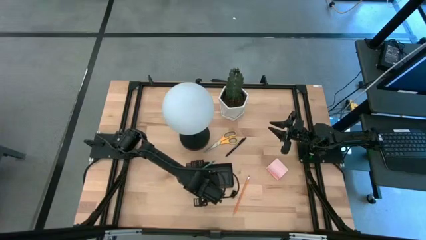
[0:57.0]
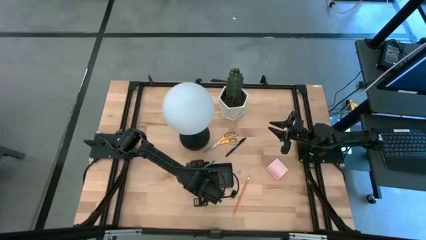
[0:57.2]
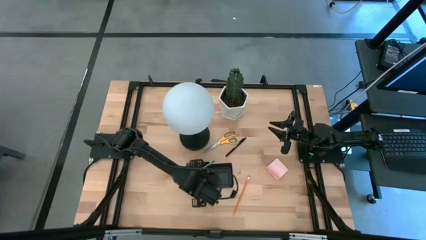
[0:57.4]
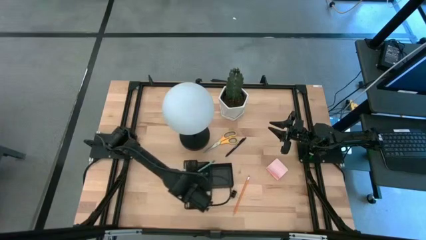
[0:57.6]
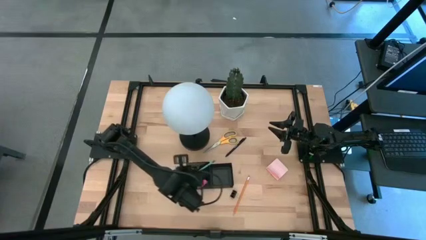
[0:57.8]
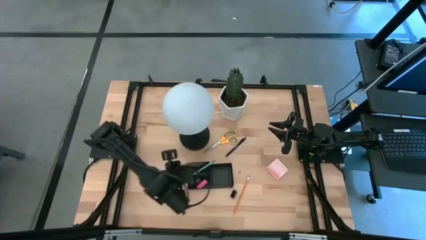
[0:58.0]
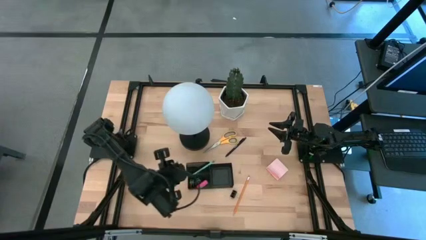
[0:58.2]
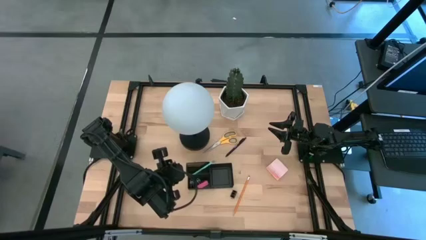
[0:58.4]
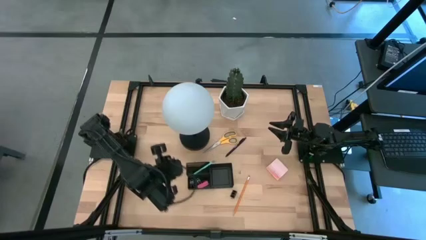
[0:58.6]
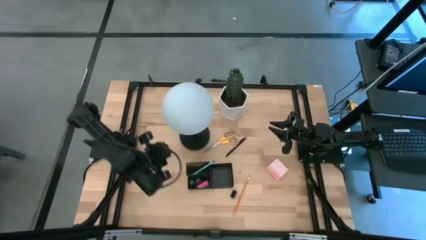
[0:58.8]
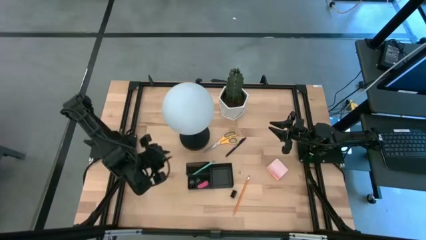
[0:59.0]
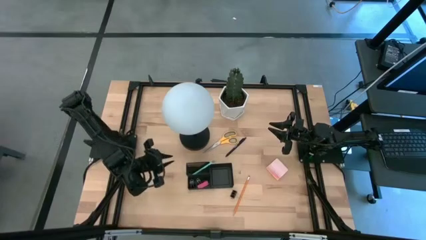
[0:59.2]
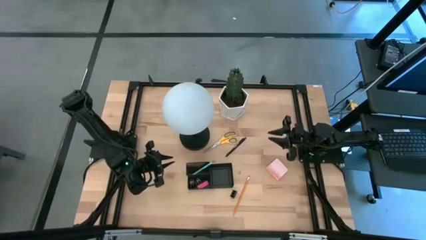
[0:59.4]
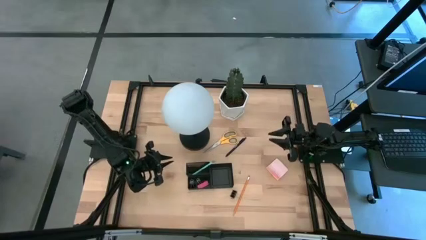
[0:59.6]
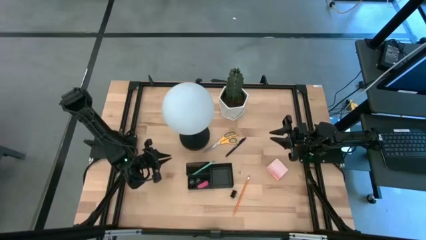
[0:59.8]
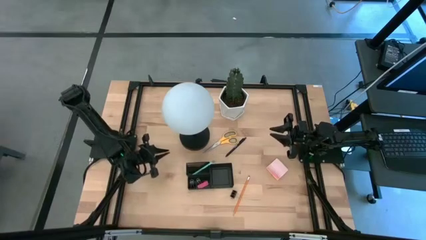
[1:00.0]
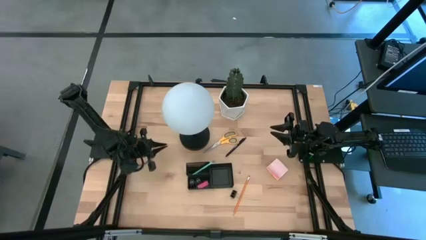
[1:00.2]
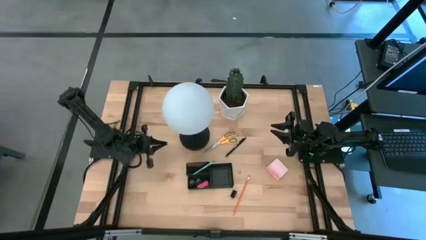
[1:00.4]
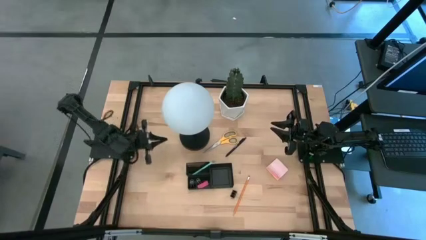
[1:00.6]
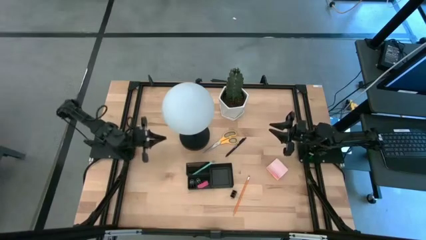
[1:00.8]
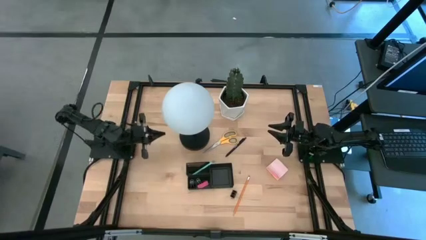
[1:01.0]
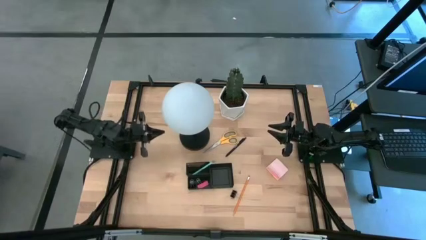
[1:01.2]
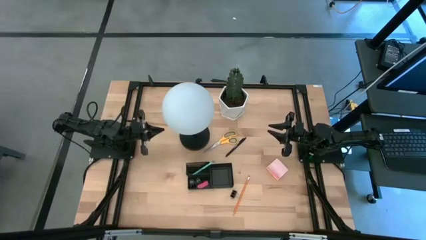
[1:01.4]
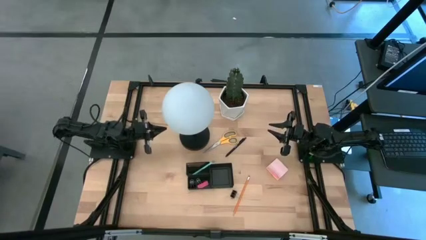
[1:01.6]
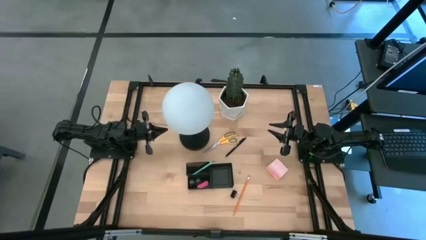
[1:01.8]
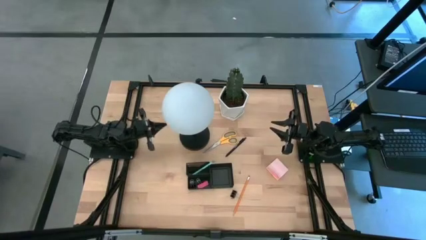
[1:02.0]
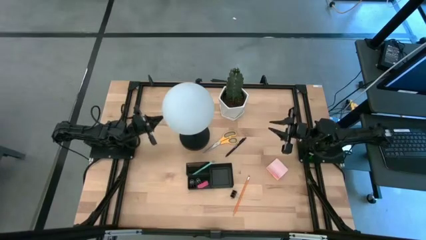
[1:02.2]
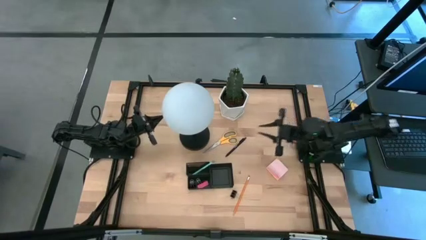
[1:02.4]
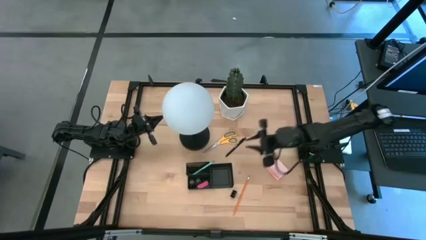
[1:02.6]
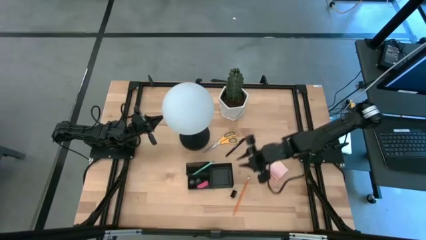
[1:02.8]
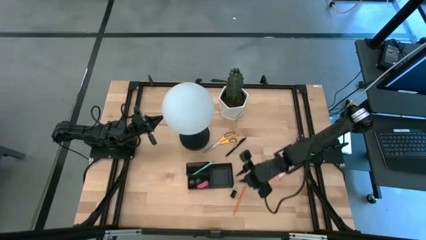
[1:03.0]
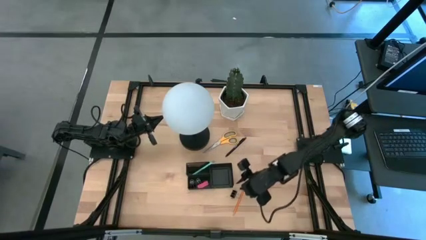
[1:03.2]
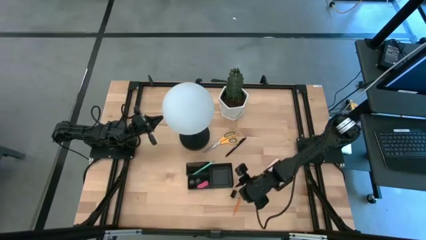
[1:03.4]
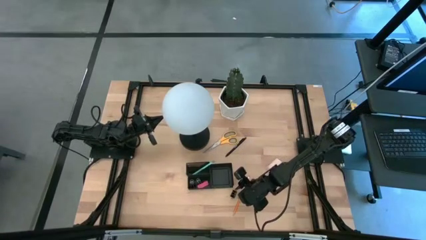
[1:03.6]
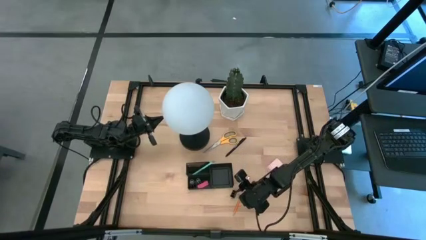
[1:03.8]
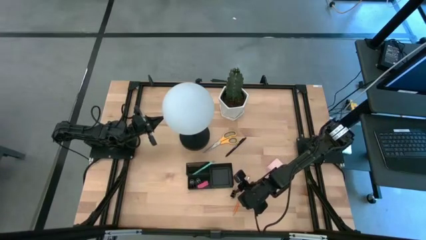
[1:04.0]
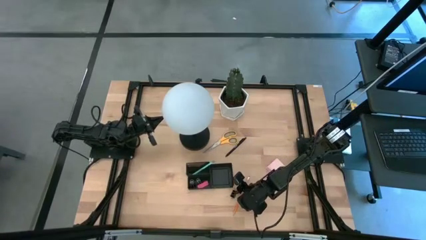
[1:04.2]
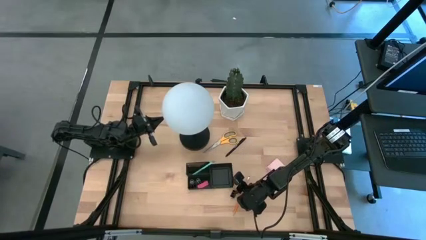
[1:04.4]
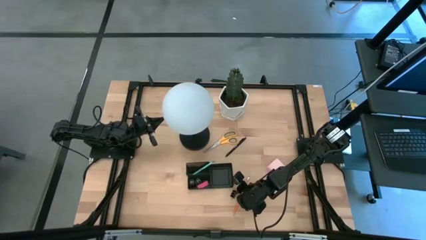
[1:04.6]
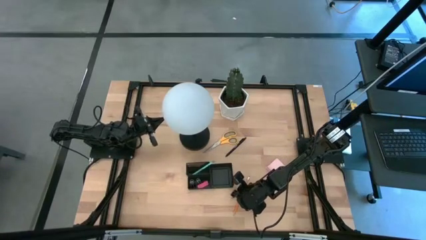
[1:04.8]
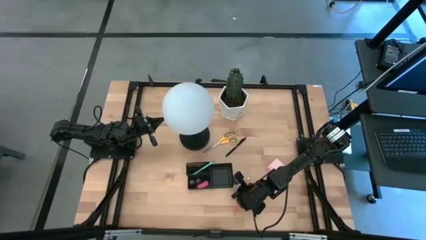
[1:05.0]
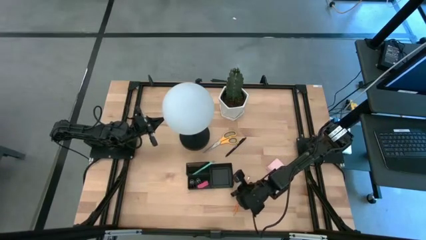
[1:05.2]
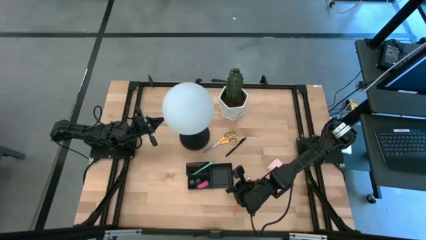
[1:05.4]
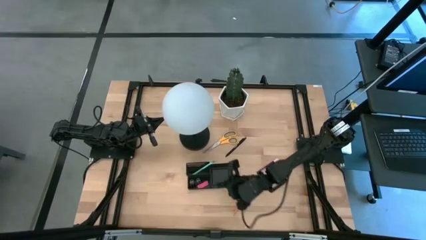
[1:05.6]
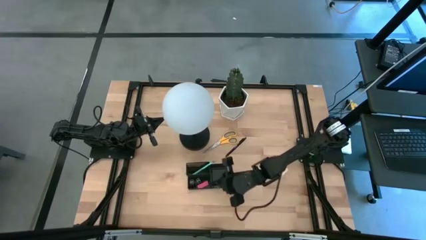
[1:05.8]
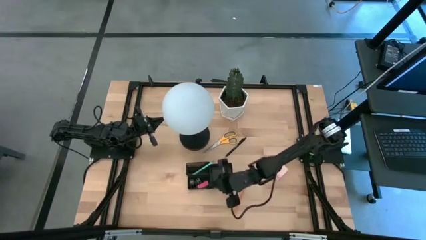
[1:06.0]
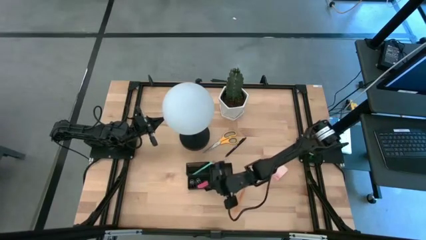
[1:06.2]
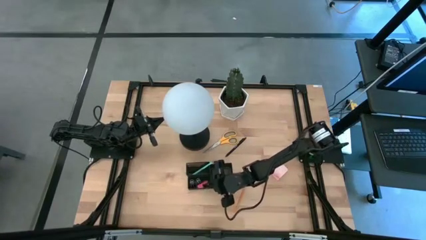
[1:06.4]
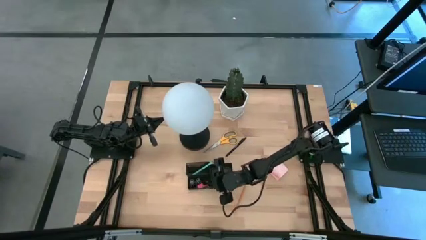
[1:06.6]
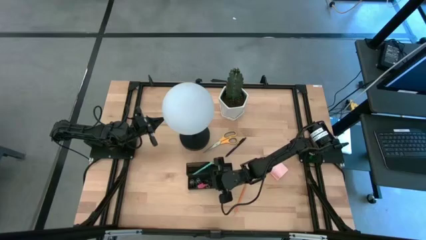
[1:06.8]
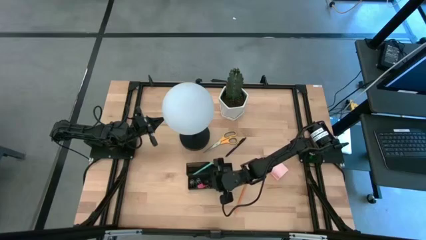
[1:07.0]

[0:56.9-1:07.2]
Task: Pick and place office supplies into organizer
Put the black binder clip into the desk organizer
